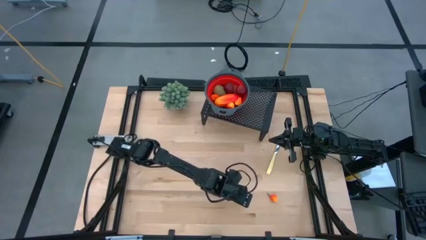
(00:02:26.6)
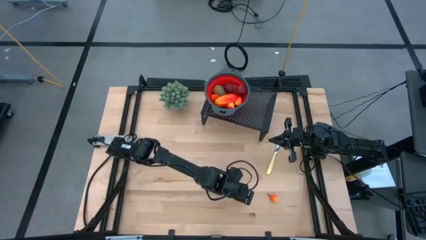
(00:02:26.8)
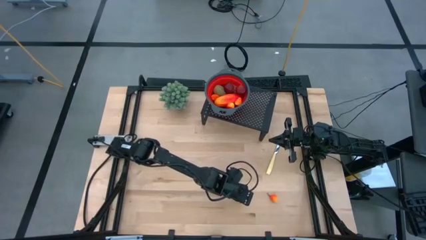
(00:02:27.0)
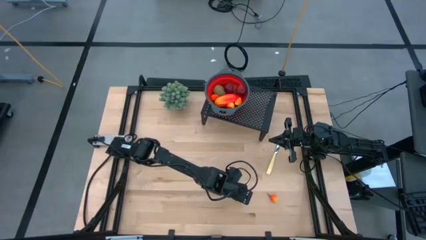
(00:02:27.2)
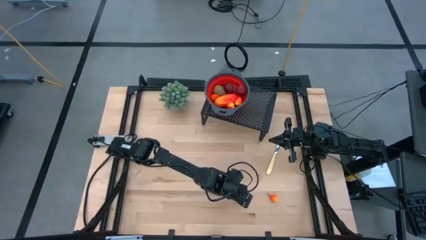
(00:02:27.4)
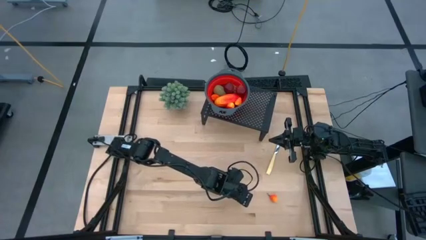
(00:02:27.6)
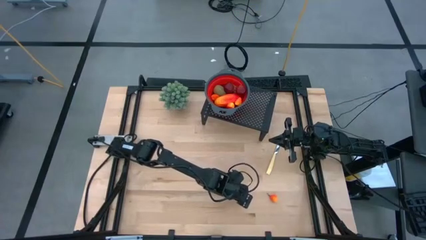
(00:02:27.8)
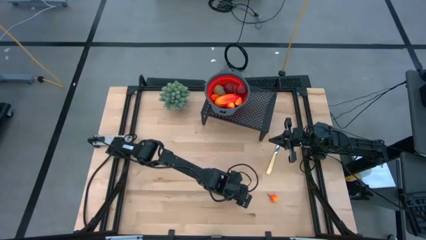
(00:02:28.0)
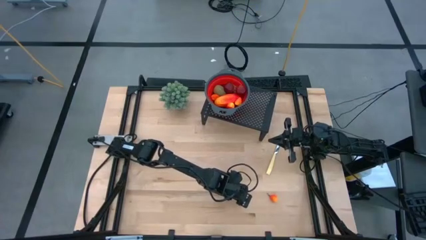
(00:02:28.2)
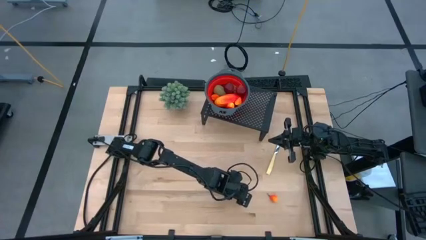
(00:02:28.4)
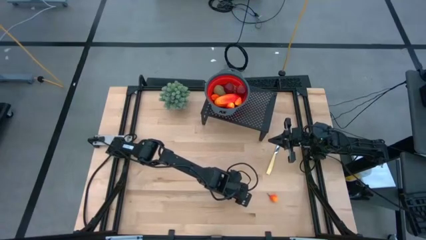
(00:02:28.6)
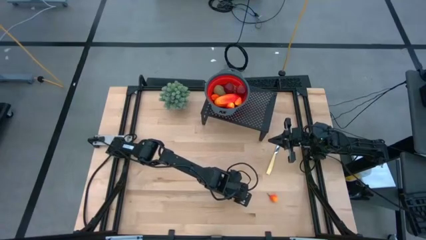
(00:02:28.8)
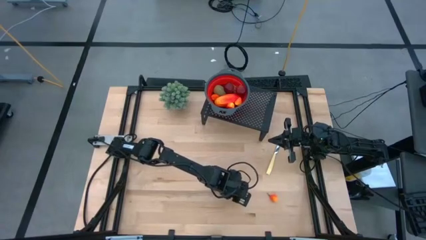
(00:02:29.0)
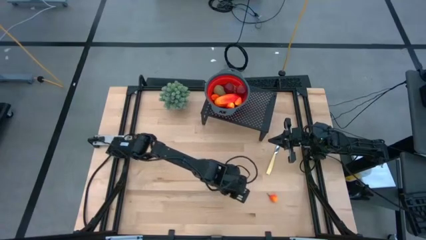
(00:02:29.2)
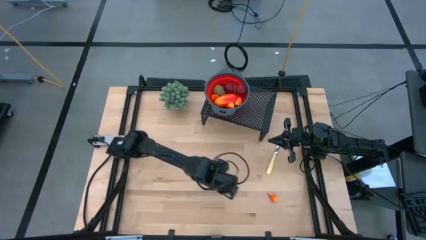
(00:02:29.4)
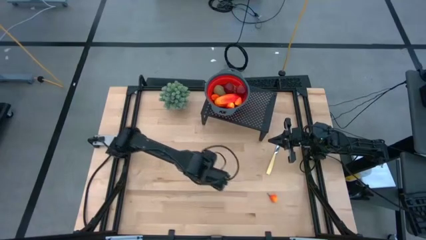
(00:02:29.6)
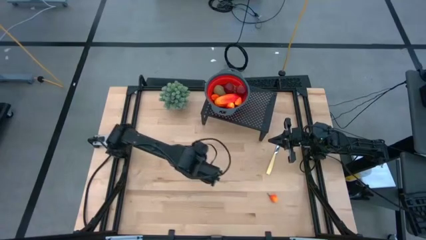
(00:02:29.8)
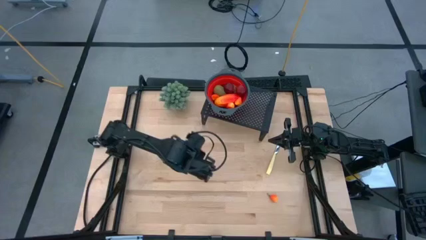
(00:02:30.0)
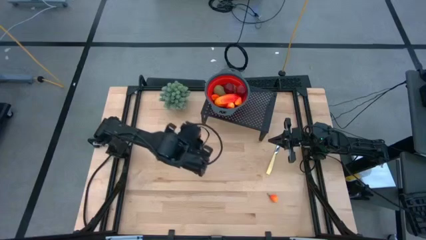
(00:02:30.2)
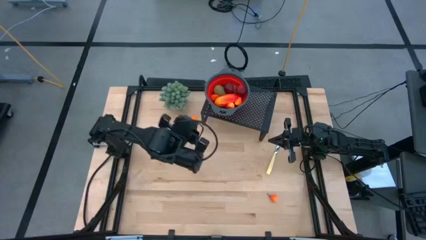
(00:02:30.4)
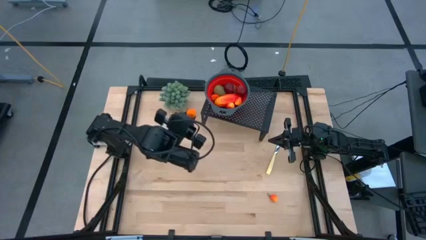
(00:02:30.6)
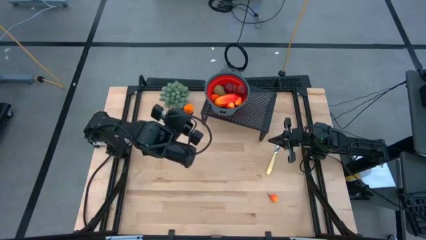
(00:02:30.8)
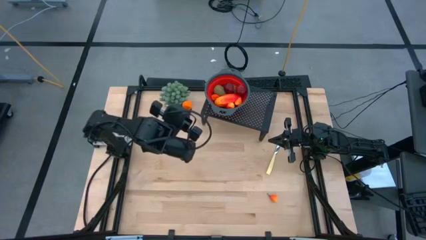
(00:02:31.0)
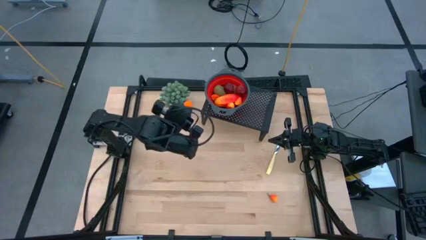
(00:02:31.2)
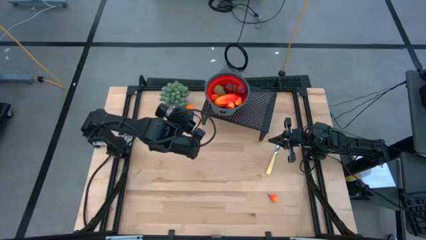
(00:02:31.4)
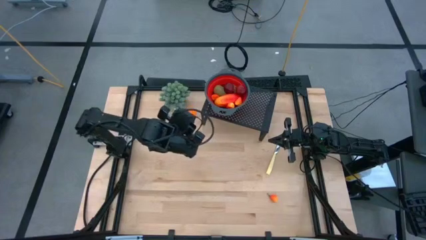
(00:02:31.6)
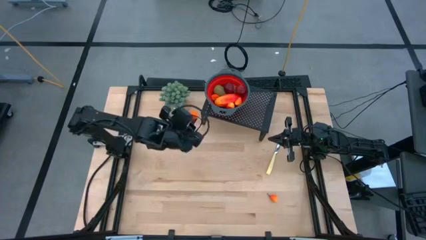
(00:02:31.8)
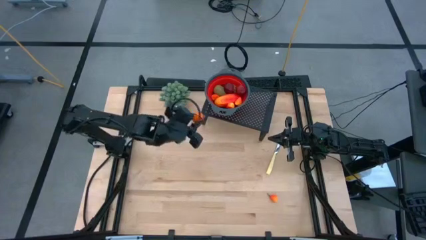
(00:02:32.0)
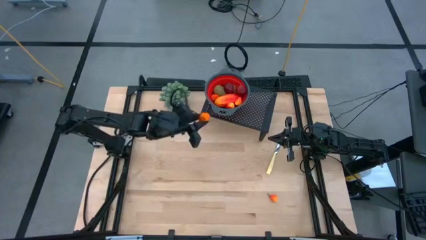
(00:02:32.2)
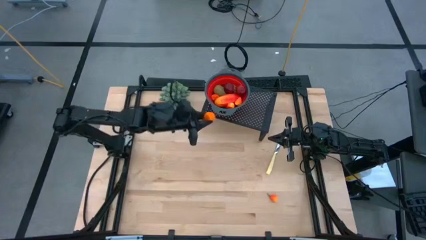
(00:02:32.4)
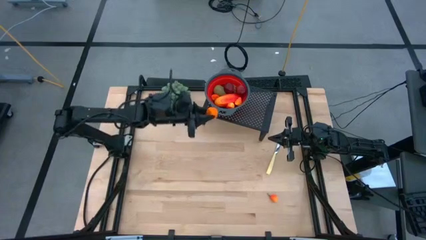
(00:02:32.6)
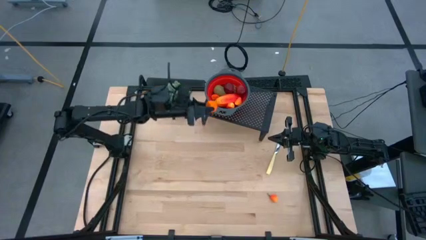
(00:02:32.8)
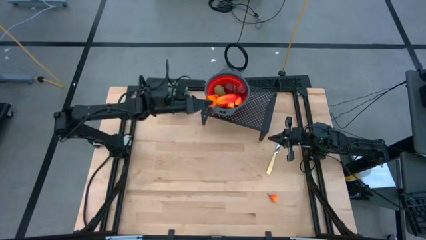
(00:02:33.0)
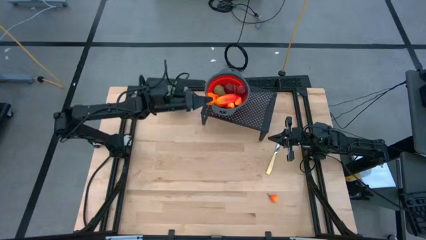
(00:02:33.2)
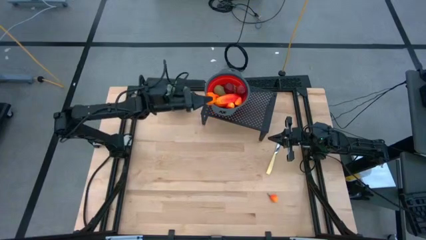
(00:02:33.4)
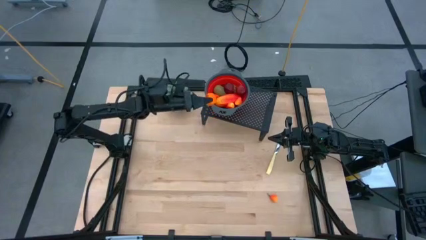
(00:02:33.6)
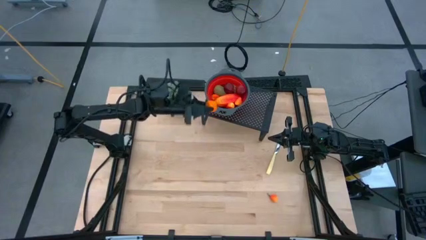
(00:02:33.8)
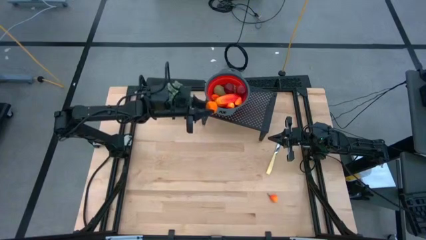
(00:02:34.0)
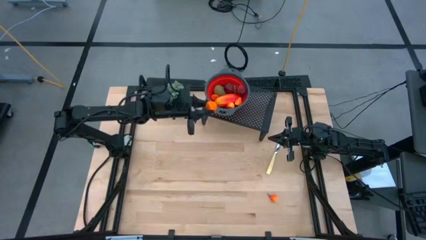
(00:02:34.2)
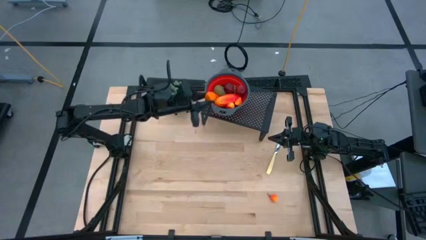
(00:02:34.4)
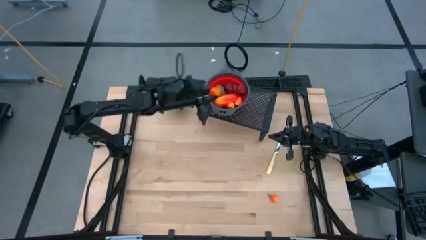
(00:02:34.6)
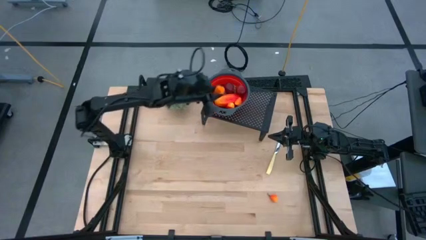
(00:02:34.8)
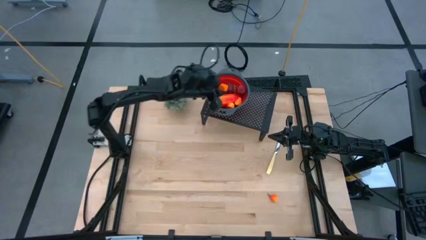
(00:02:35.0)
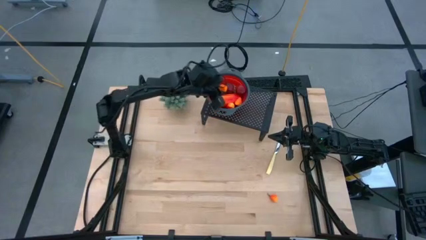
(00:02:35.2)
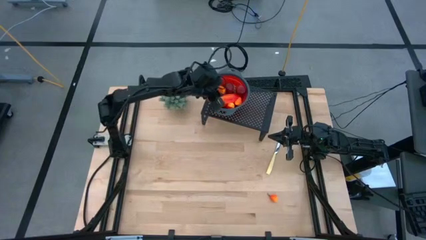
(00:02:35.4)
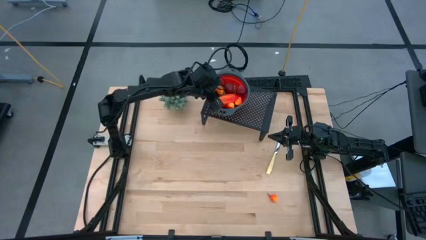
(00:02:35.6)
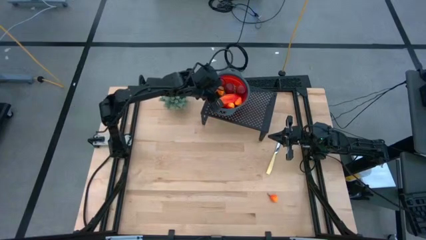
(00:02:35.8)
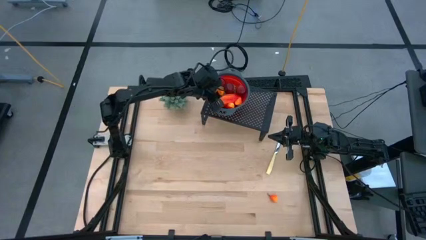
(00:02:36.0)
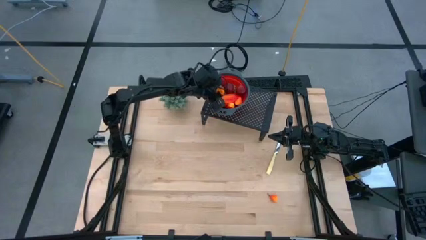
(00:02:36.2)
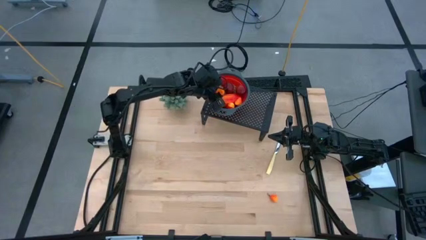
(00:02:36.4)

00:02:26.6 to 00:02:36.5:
Task: Pick & Place Fruit
Put the tangerine into the red strainer bowl

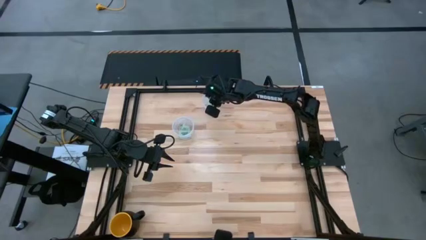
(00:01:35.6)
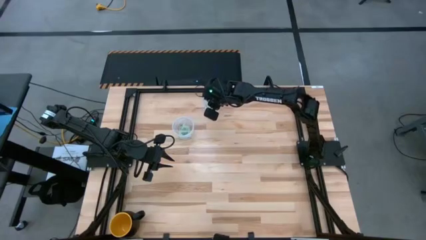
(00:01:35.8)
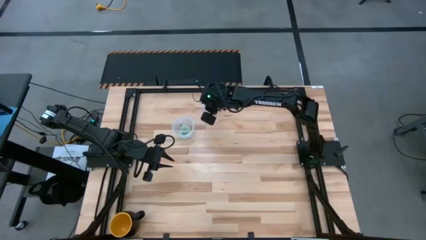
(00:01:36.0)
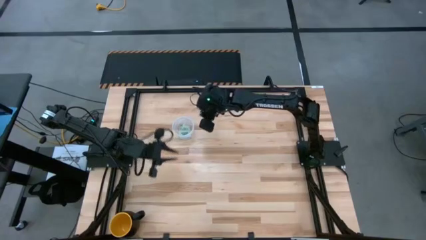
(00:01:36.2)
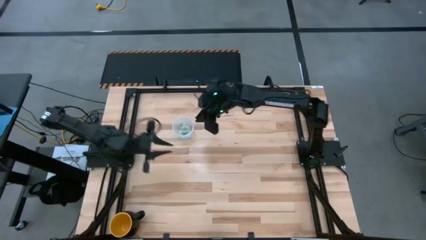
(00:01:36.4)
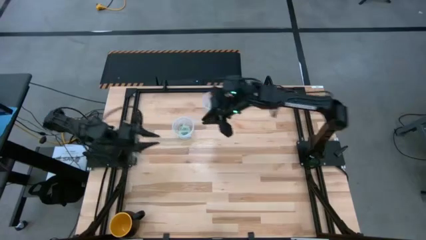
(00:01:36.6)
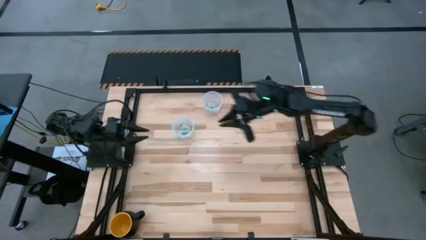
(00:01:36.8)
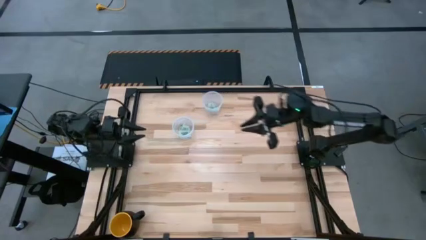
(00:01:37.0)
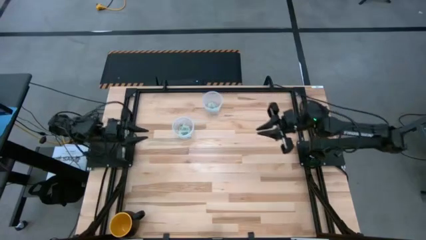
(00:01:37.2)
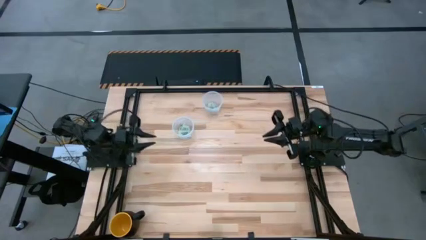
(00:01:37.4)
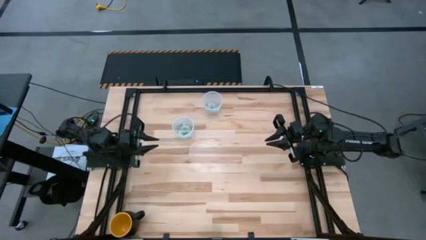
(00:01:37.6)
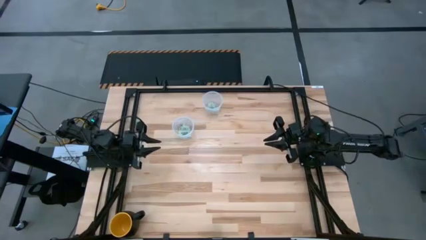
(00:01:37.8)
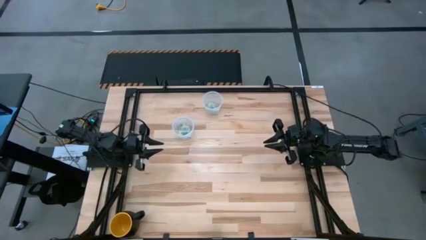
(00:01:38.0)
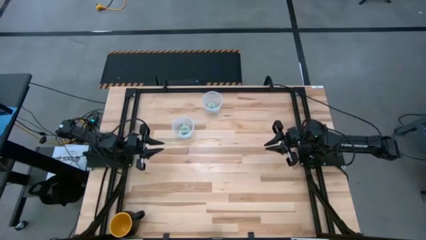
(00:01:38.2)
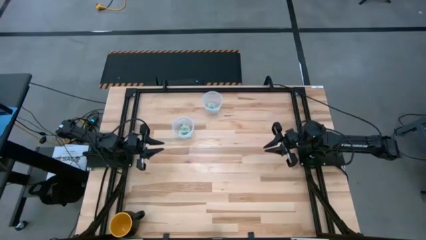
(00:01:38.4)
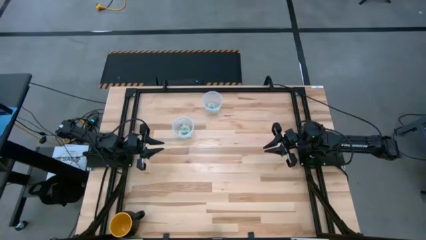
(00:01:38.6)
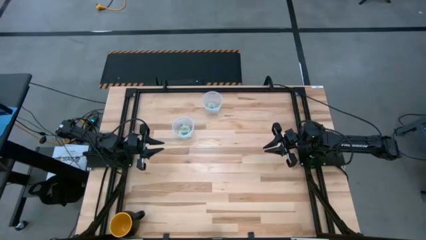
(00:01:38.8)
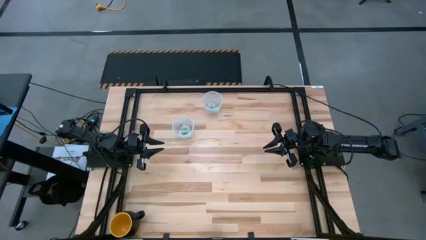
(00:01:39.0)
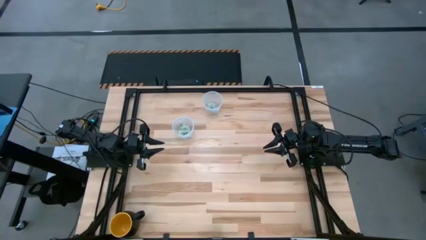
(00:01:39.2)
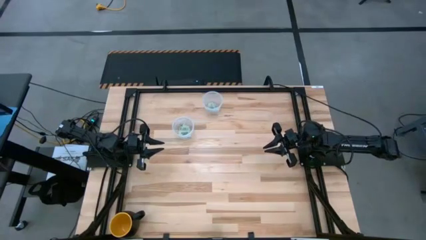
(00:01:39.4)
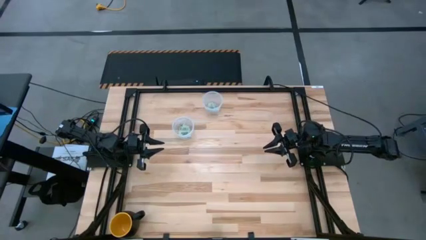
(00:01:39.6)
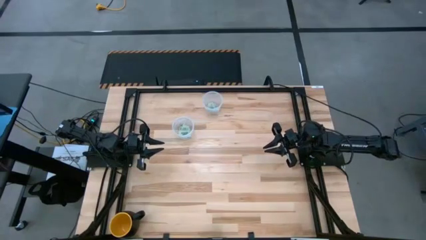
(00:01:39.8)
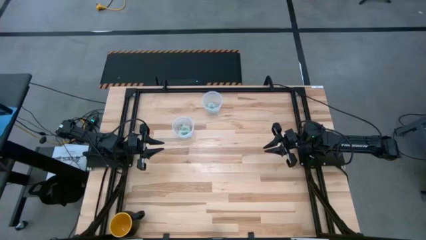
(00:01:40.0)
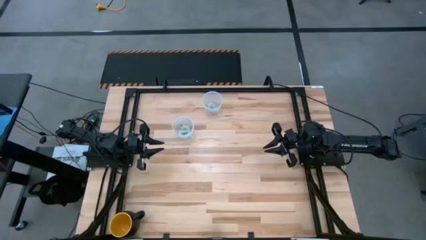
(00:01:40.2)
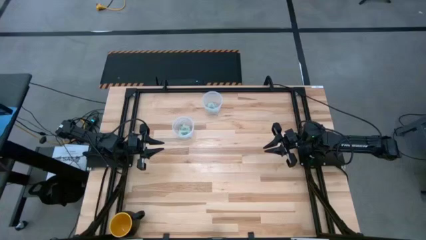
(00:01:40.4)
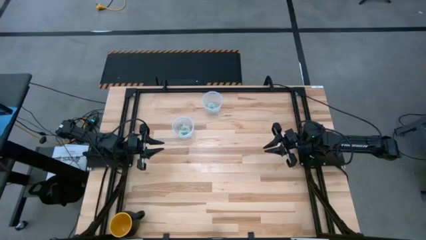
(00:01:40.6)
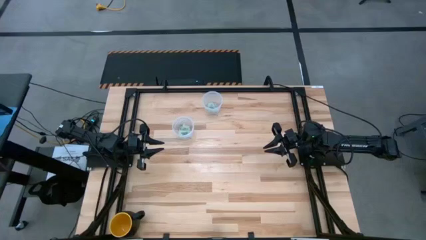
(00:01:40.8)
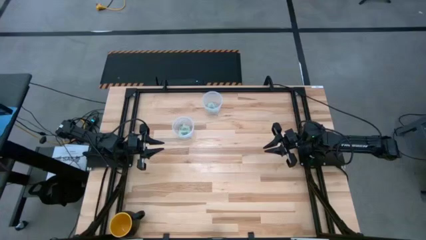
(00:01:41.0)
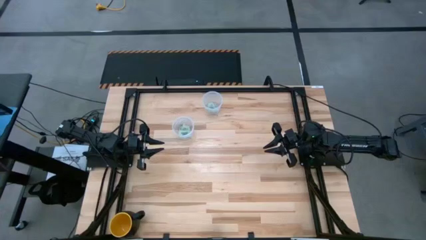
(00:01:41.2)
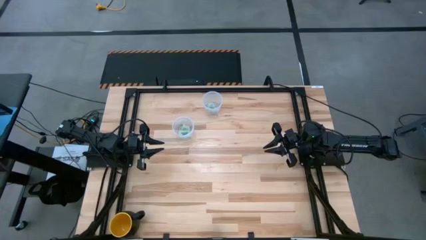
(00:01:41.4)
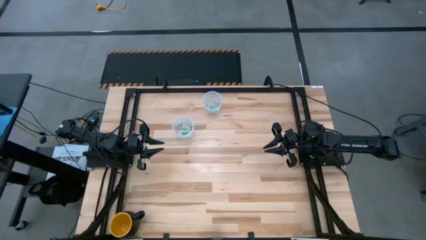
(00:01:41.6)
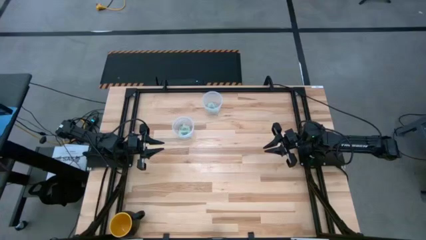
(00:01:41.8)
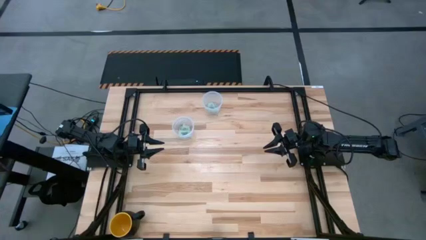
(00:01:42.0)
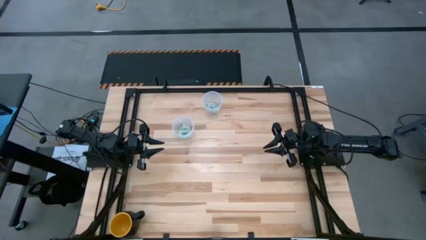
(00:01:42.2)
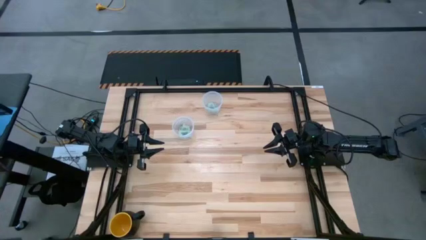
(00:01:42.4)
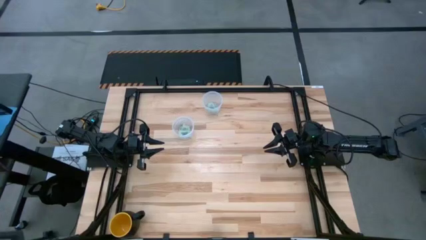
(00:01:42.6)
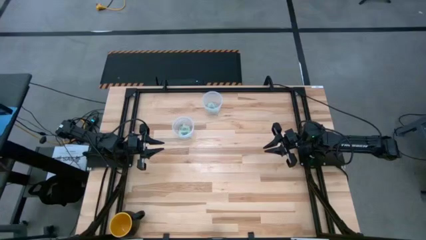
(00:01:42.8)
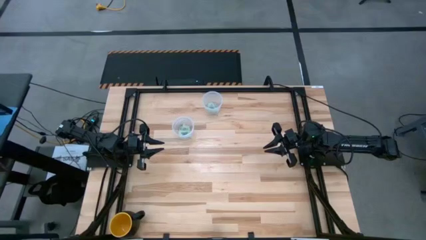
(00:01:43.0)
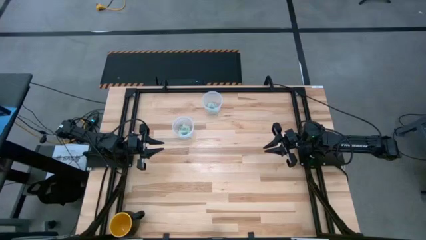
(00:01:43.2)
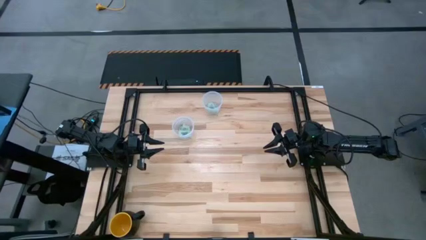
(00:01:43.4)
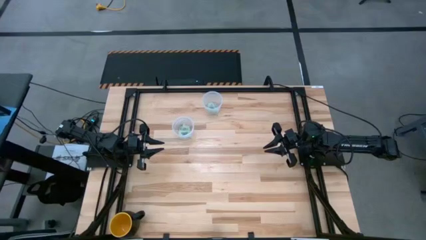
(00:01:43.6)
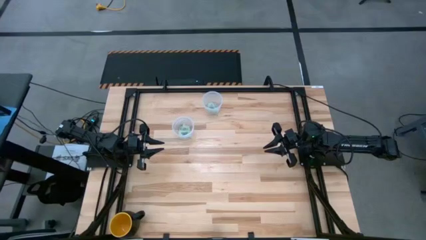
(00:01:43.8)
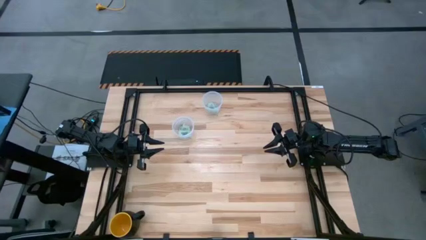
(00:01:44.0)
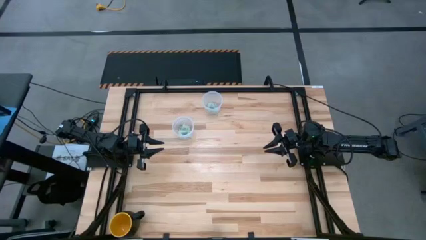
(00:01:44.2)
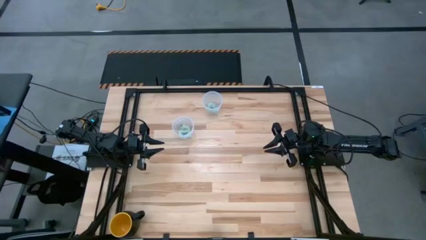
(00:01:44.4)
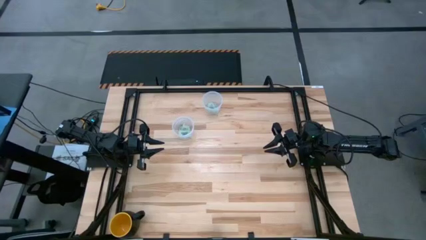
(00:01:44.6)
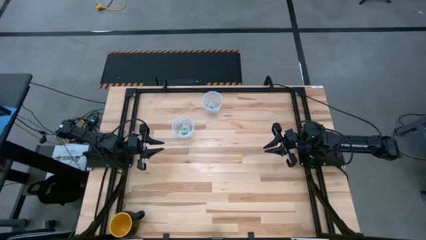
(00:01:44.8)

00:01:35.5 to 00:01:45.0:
Task: Pick and place items into bin
Return to Home Position
